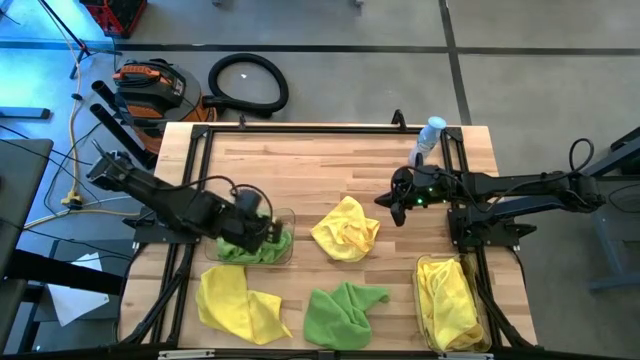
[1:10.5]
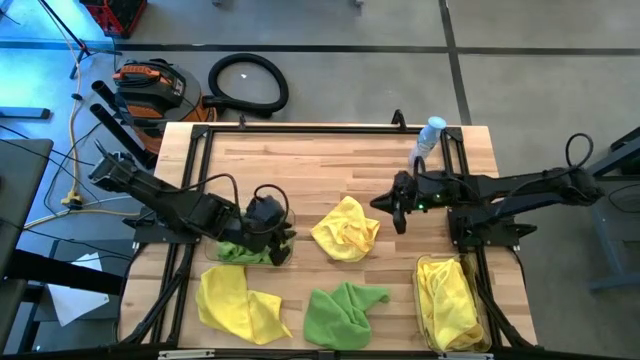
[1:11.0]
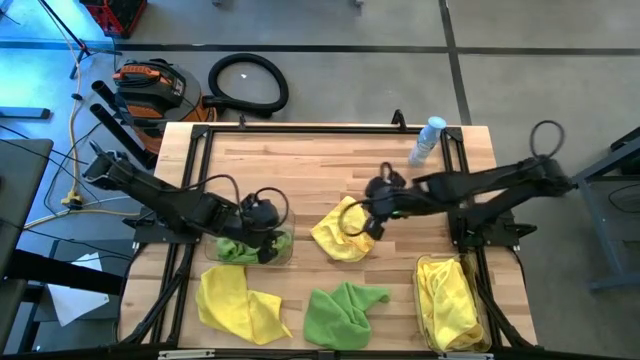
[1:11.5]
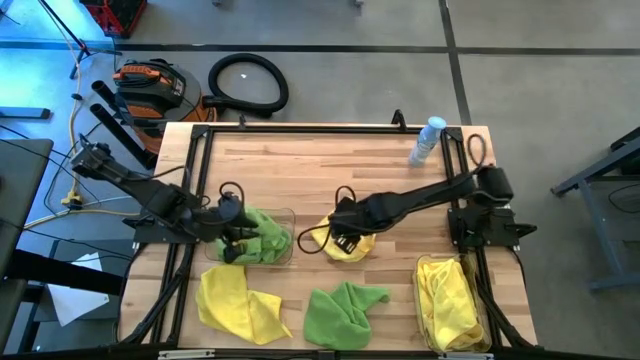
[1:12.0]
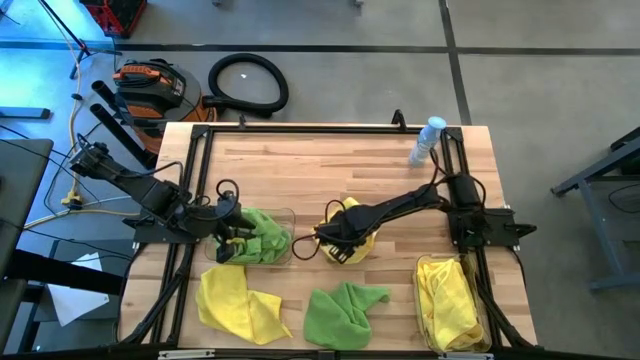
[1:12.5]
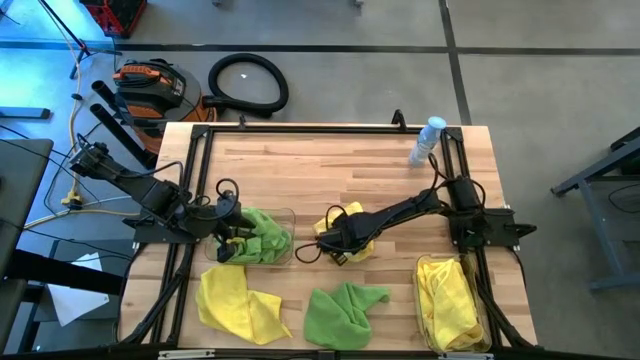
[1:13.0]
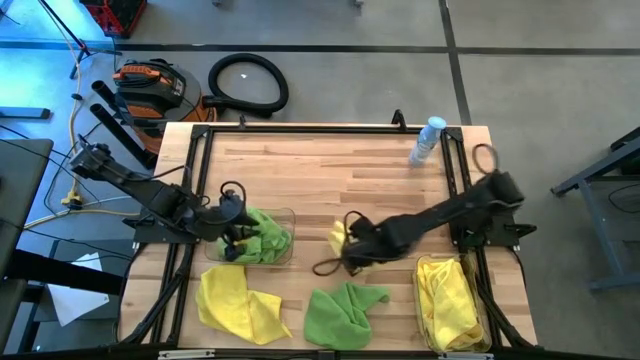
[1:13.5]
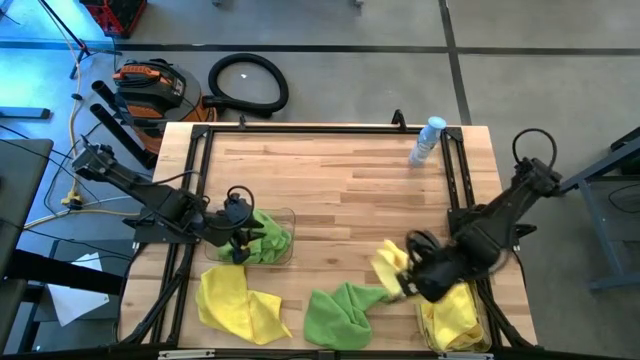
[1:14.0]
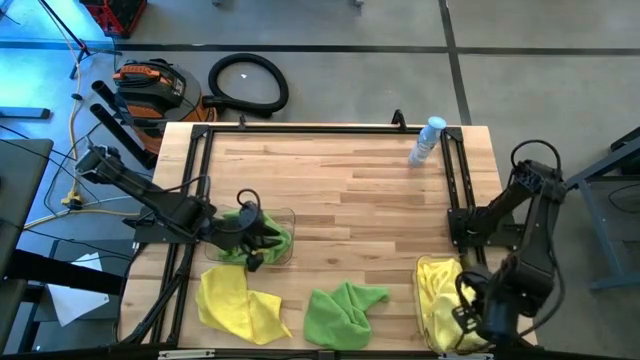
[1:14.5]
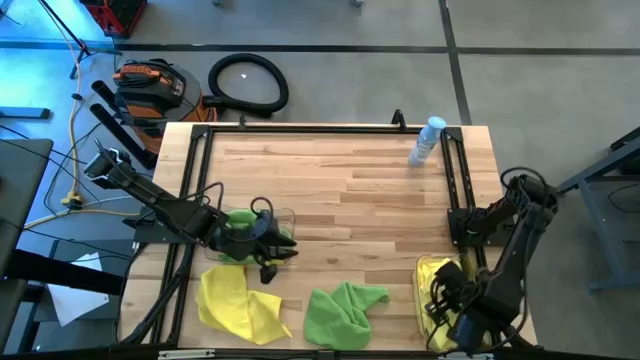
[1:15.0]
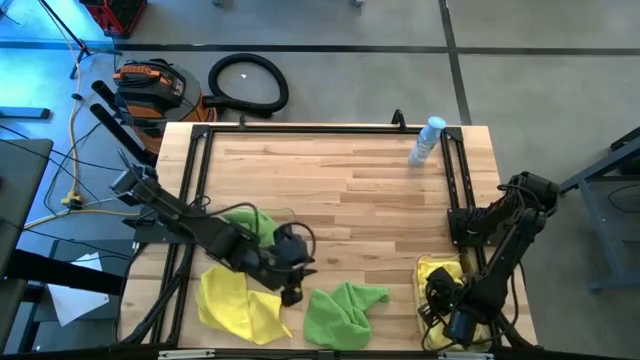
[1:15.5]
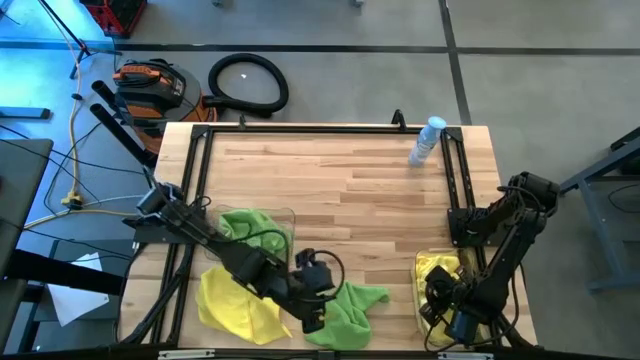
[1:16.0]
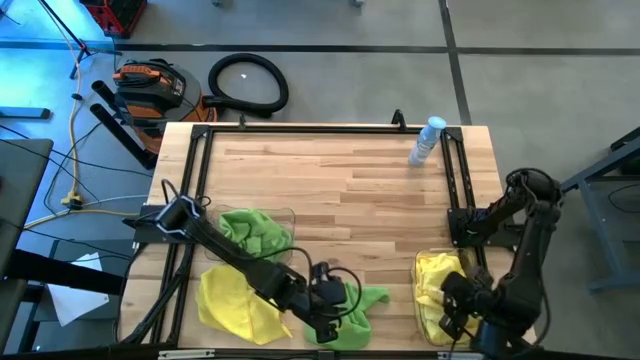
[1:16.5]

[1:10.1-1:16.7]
Task: Sort microfiber towel by color & place in baskets
Put the yellow towel into the right transparent bin

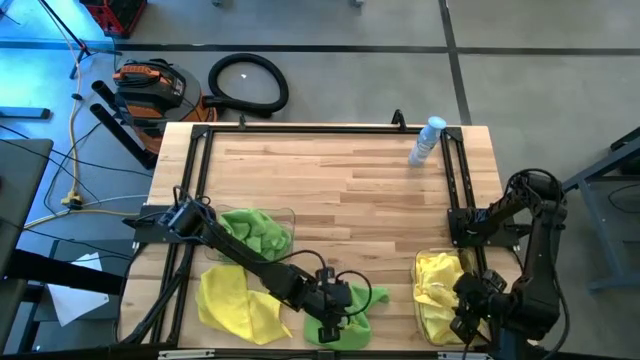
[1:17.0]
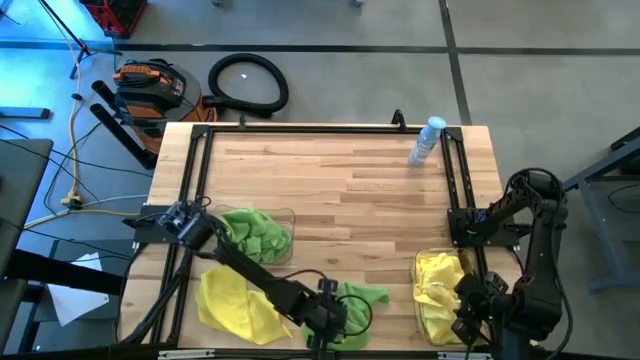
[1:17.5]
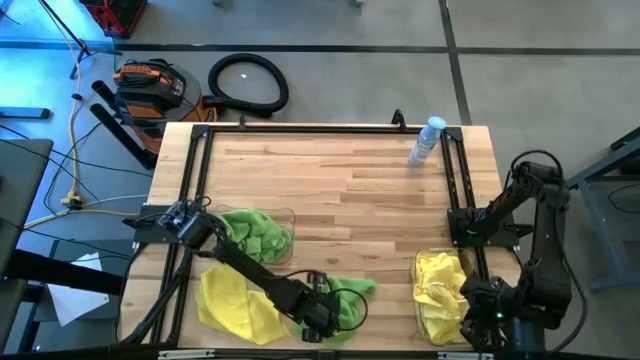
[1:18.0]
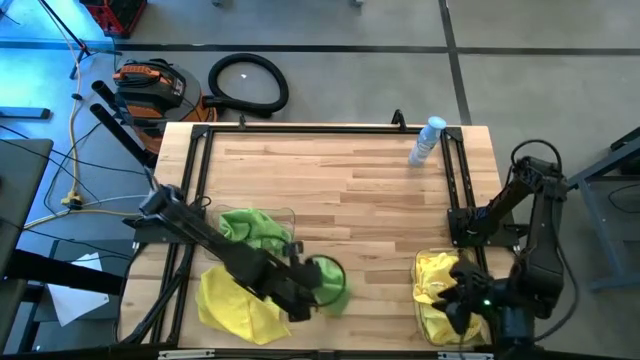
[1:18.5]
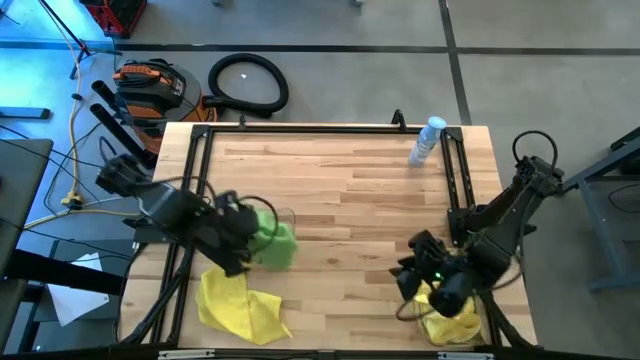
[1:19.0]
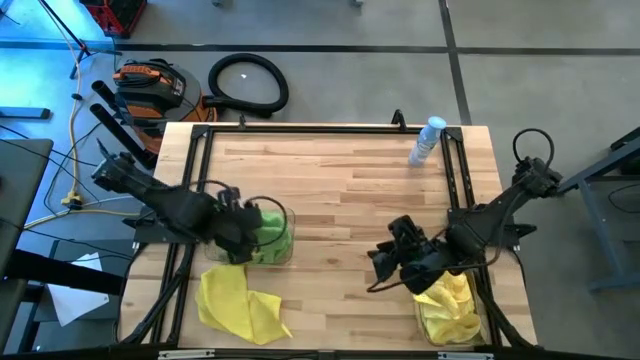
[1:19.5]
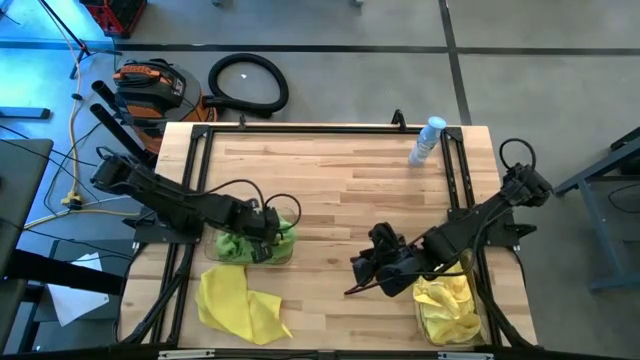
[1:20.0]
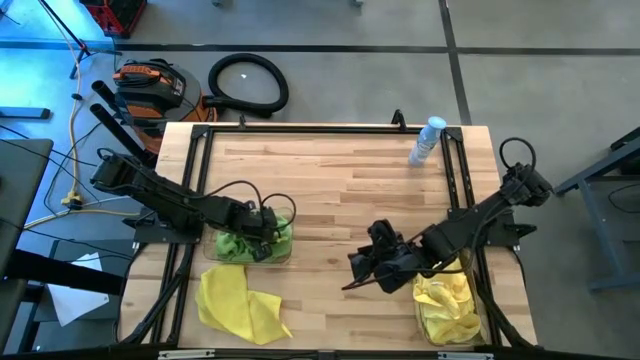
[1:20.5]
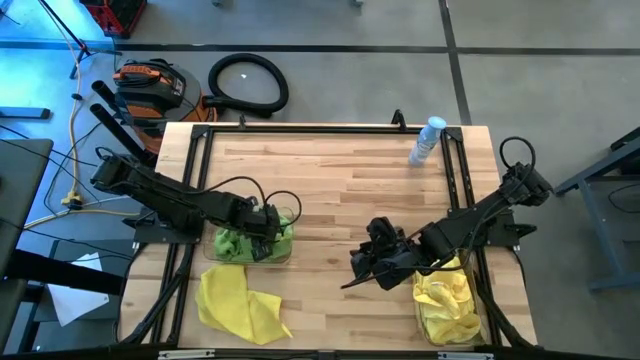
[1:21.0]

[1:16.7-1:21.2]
Put the green towel into the left transparent bin

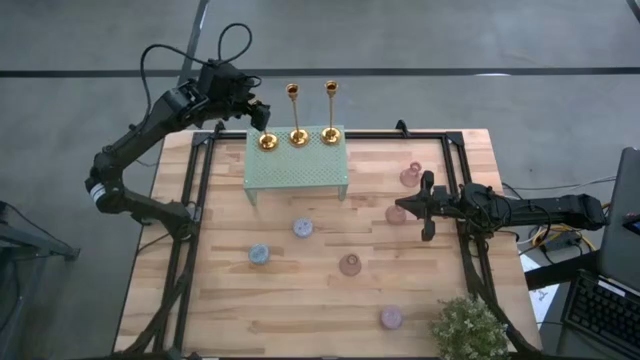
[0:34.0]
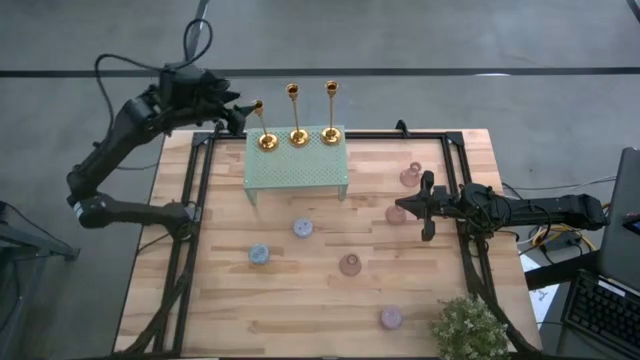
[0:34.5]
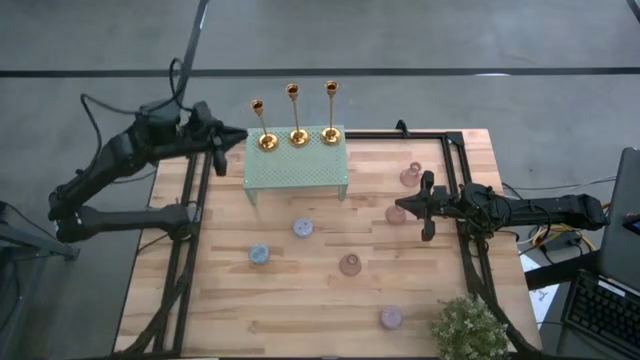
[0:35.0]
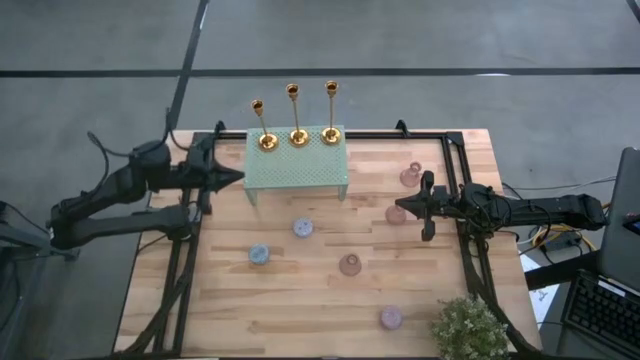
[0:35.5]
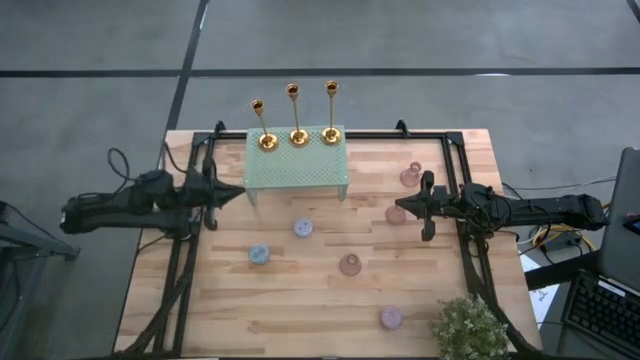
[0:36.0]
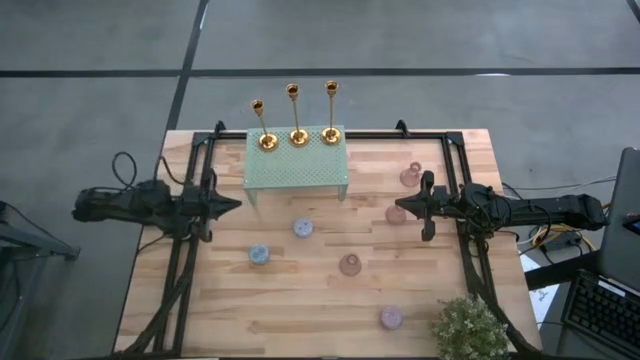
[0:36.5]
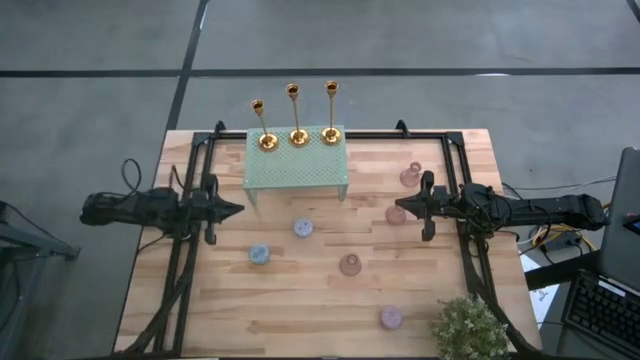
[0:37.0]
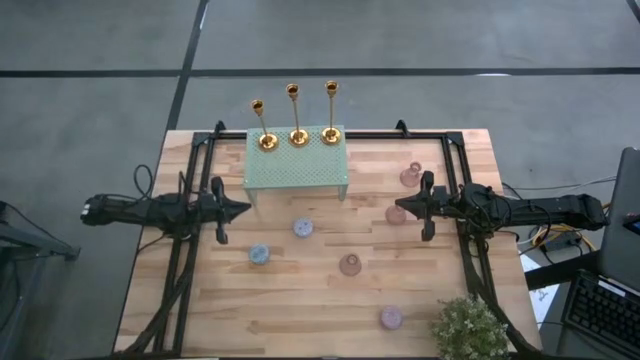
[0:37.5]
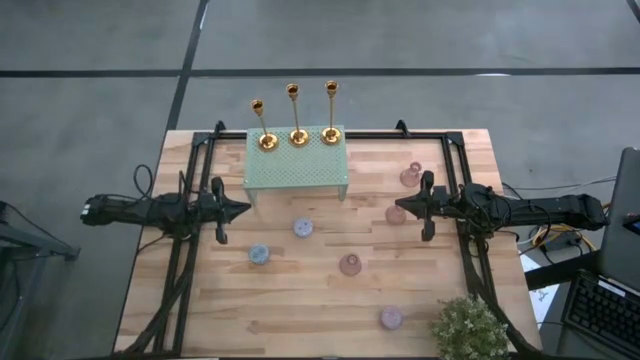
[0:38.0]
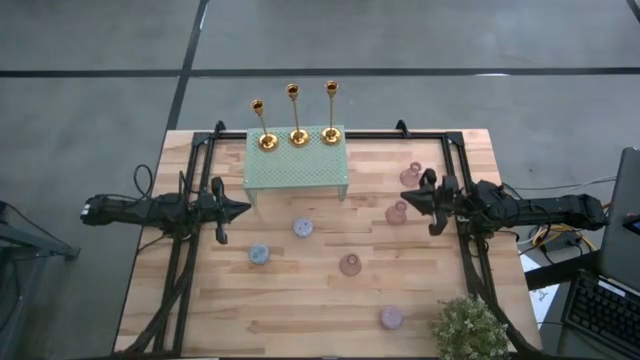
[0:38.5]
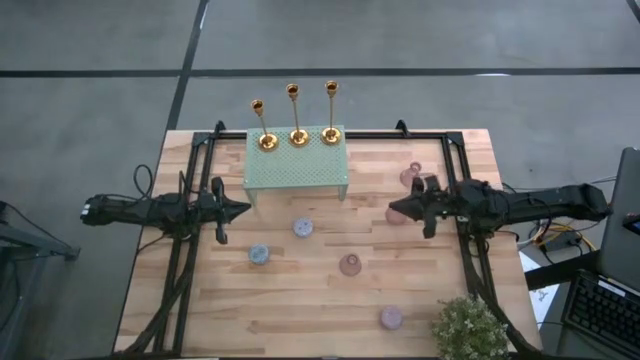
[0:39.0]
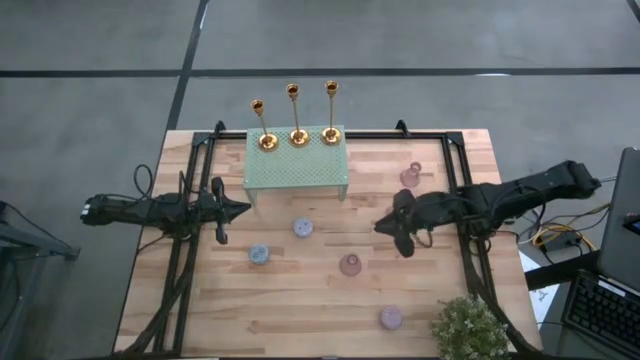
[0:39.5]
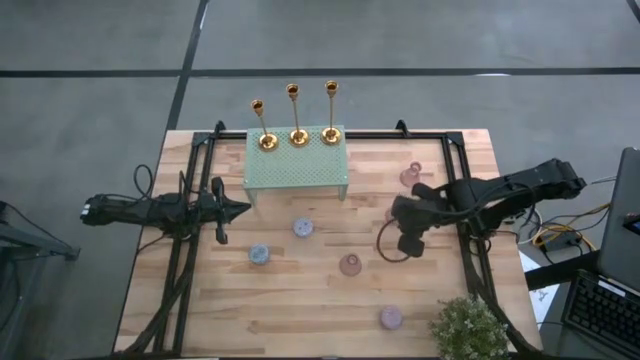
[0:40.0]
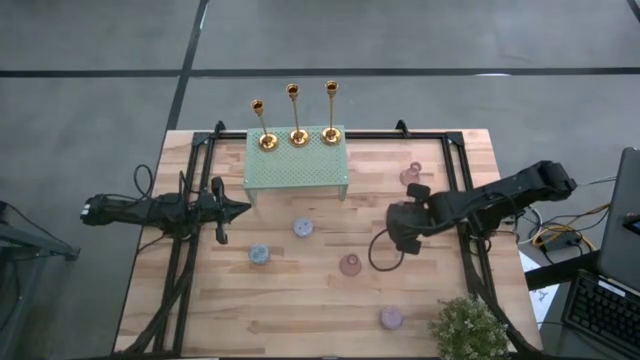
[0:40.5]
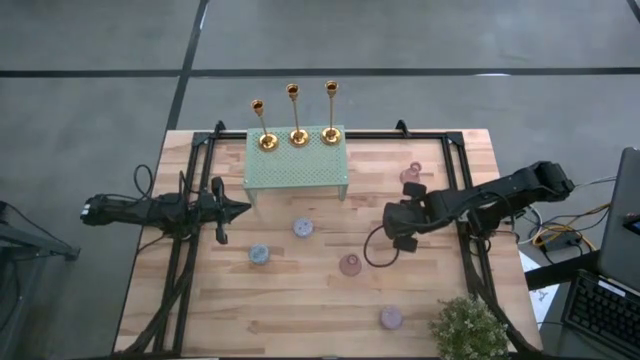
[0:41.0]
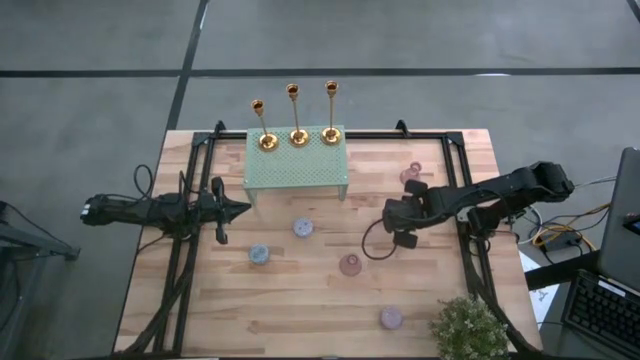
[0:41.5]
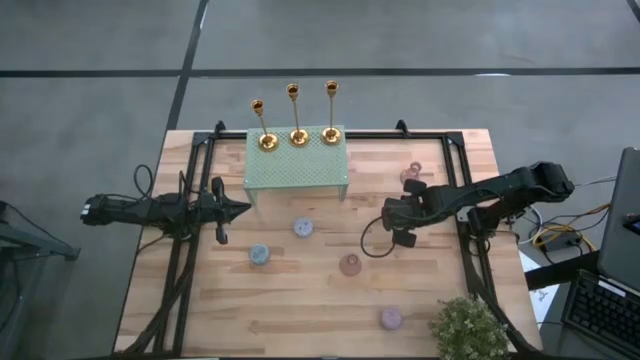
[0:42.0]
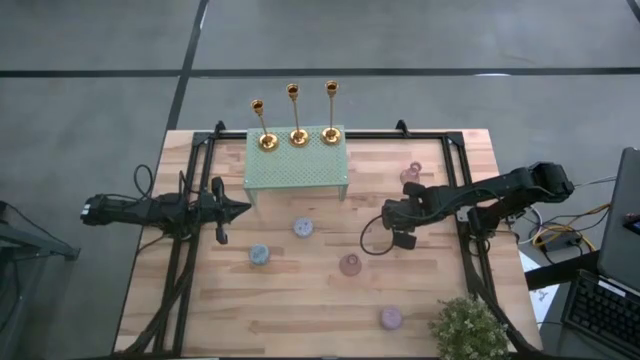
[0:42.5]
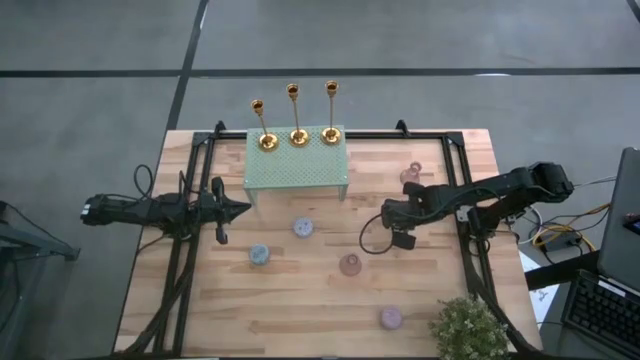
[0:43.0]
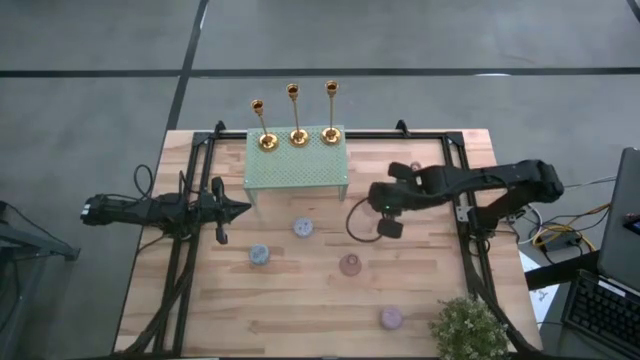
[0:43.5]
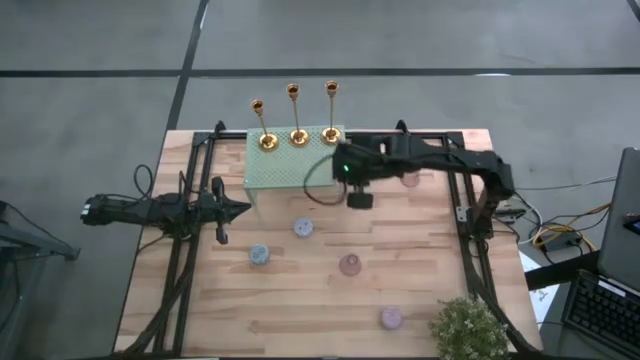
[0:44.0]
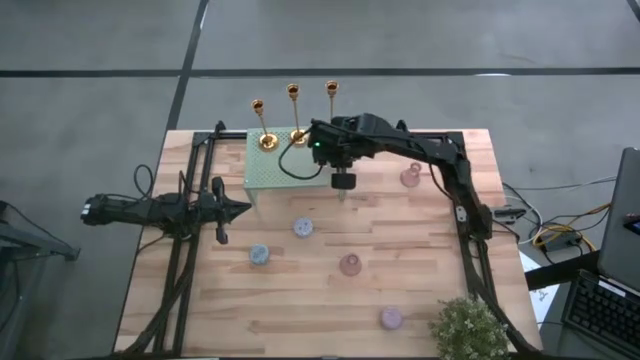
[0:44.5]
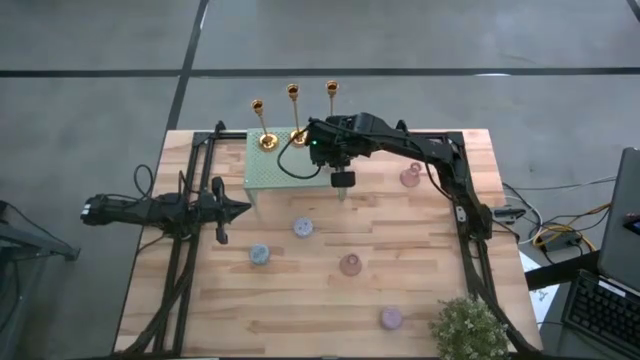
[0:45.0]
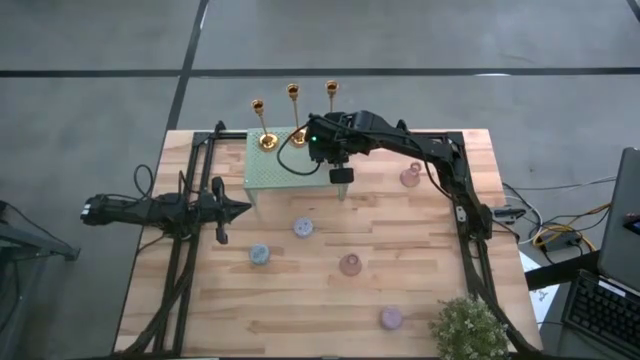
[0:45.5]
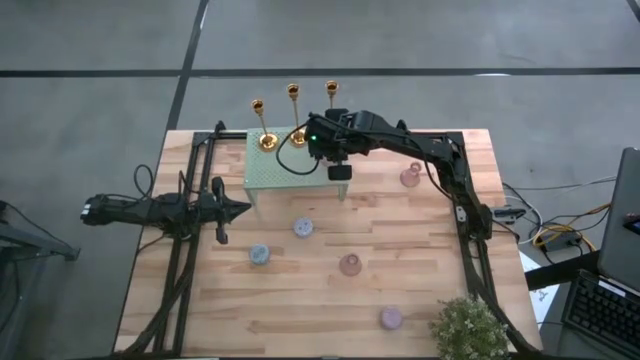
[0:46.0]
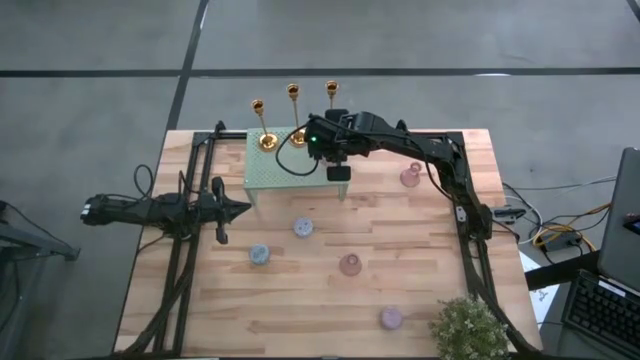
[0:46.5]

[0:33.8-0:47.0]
Task: Pick & Place candle stick holders
Put the middle pink glass candle holder on the shelf
